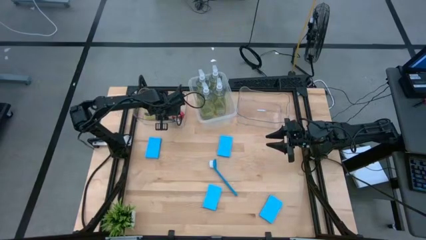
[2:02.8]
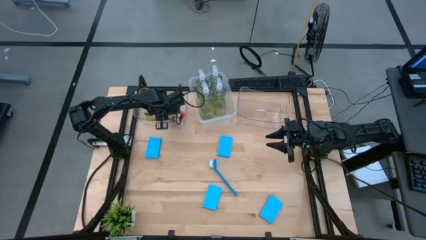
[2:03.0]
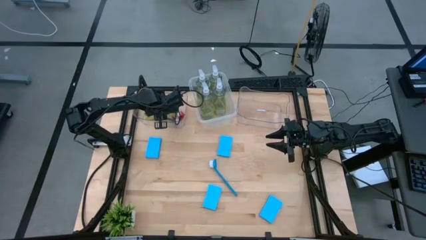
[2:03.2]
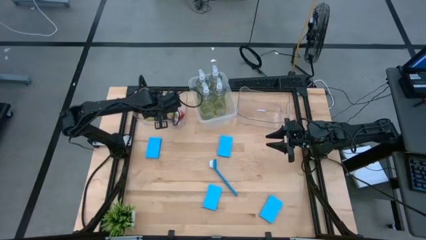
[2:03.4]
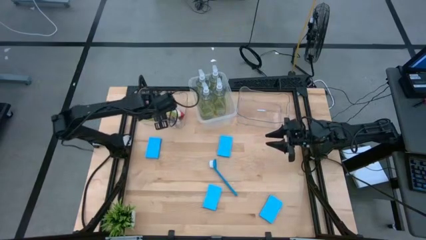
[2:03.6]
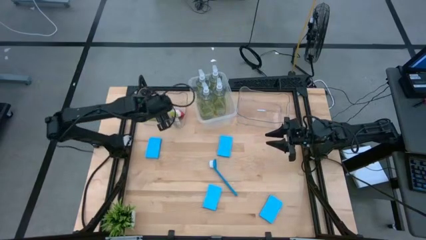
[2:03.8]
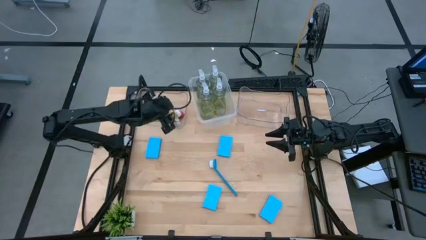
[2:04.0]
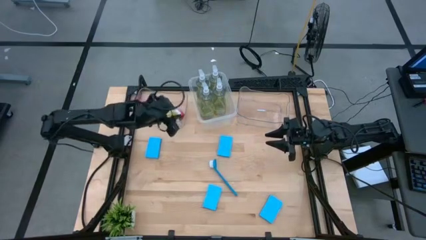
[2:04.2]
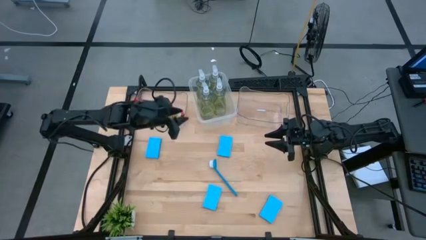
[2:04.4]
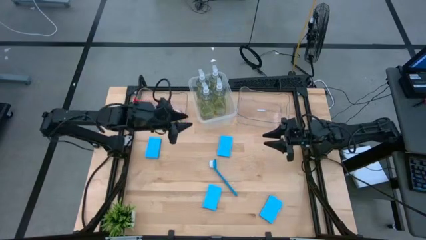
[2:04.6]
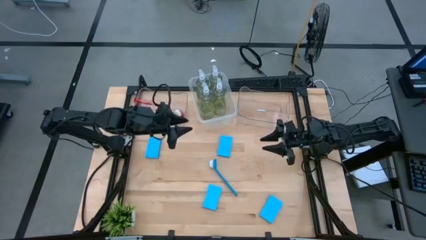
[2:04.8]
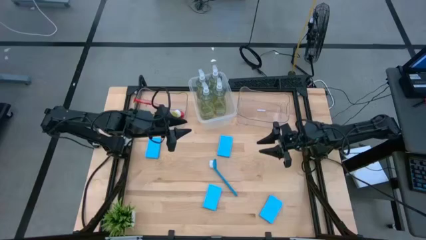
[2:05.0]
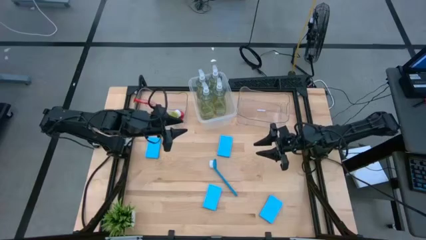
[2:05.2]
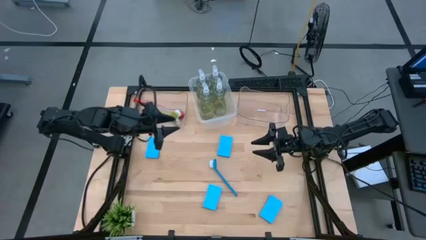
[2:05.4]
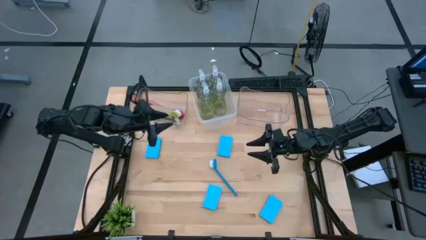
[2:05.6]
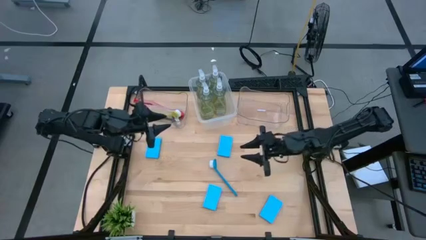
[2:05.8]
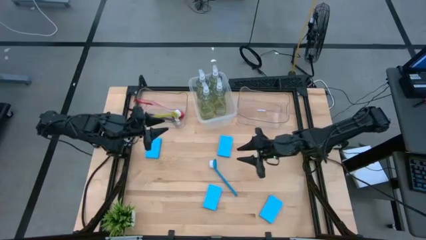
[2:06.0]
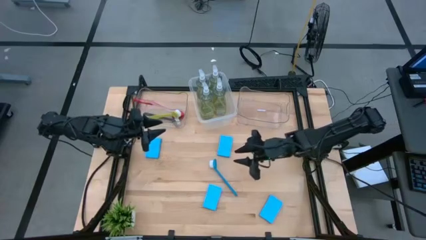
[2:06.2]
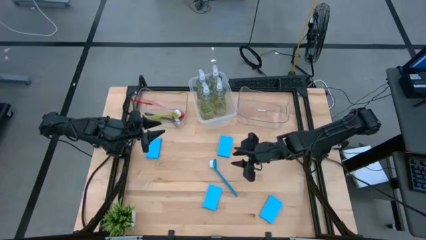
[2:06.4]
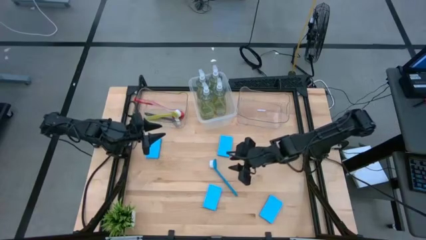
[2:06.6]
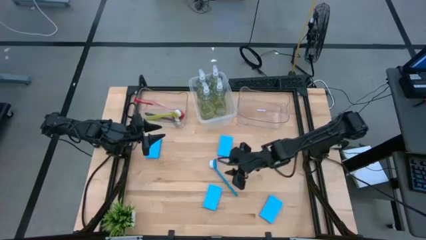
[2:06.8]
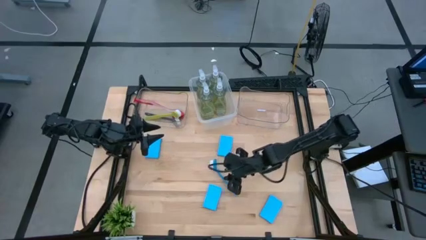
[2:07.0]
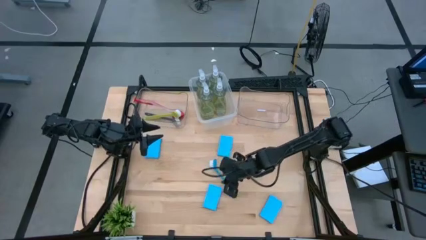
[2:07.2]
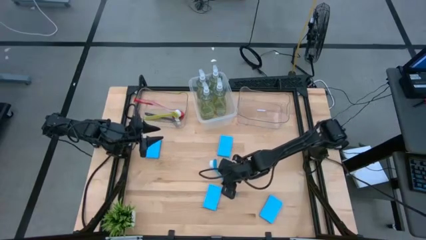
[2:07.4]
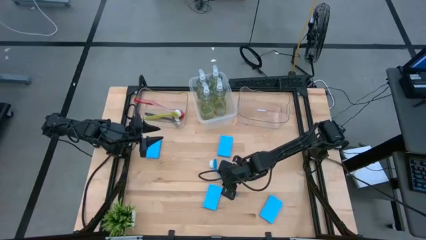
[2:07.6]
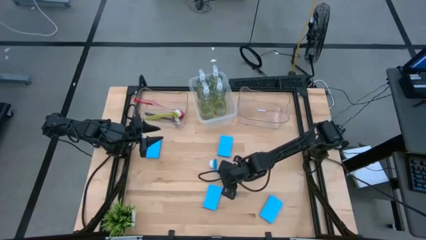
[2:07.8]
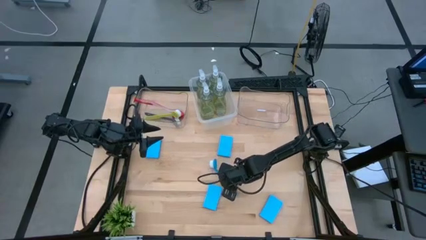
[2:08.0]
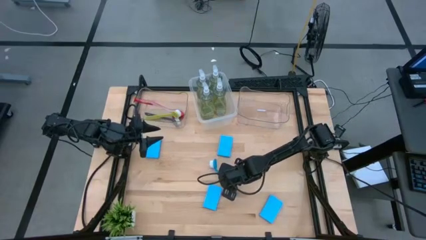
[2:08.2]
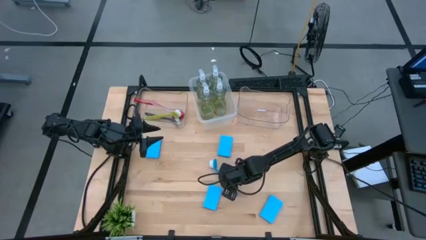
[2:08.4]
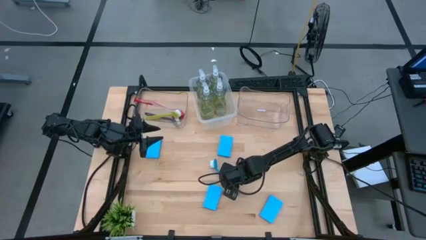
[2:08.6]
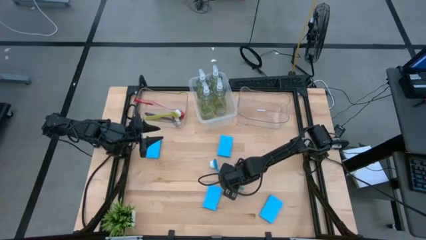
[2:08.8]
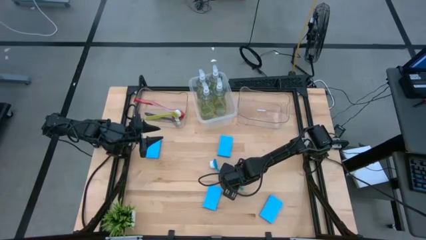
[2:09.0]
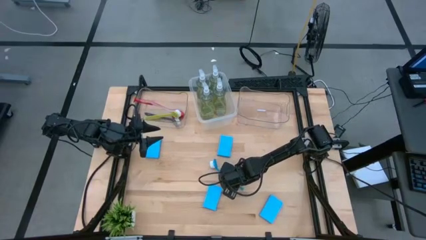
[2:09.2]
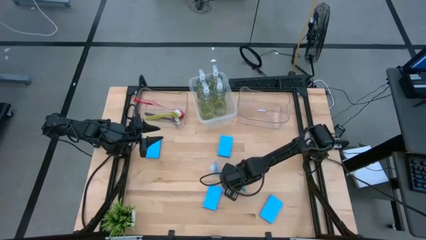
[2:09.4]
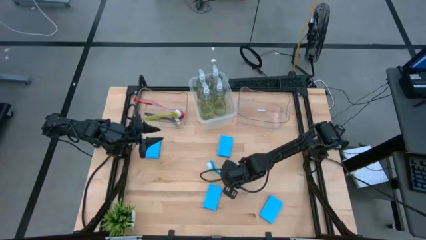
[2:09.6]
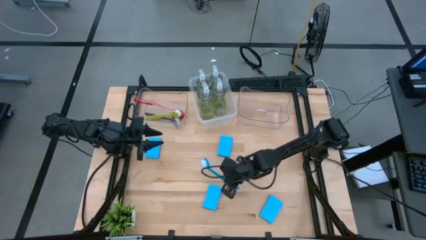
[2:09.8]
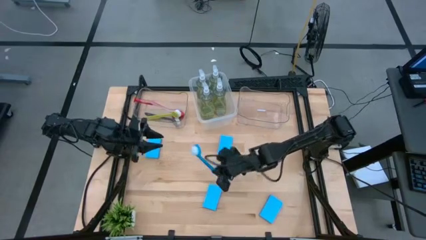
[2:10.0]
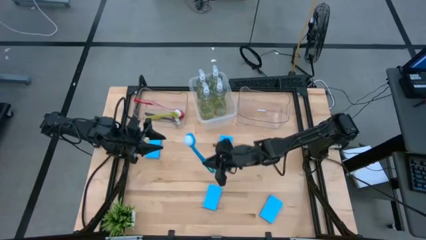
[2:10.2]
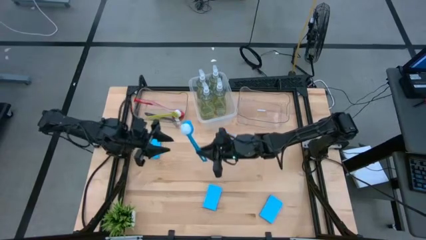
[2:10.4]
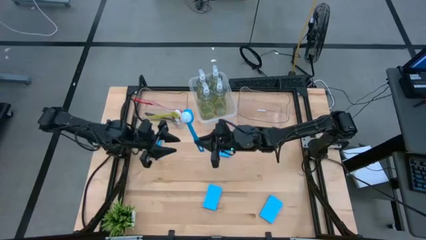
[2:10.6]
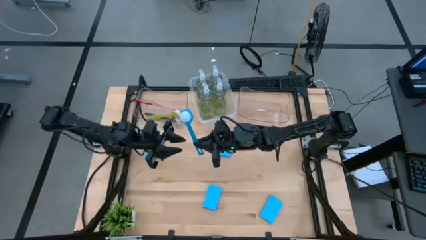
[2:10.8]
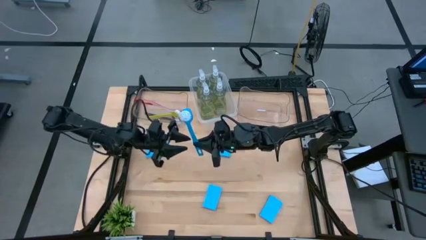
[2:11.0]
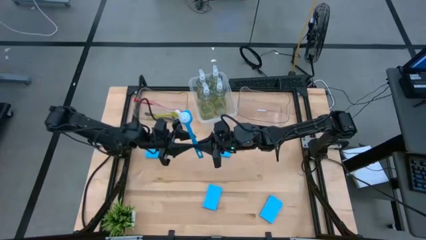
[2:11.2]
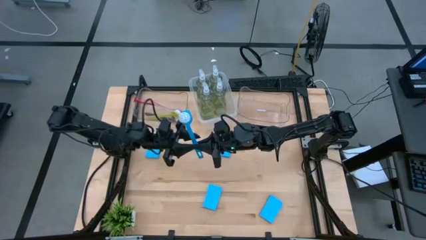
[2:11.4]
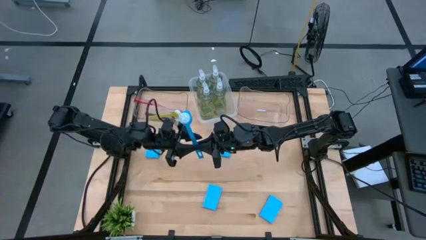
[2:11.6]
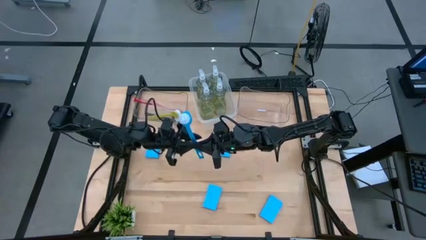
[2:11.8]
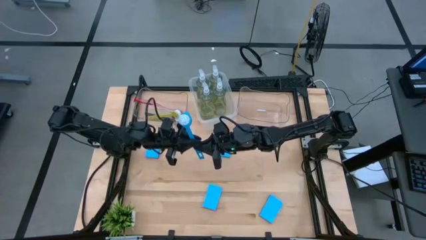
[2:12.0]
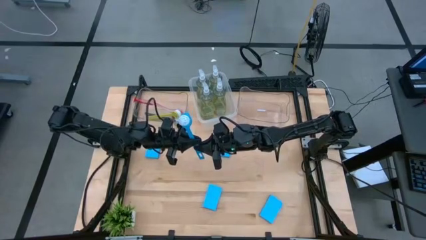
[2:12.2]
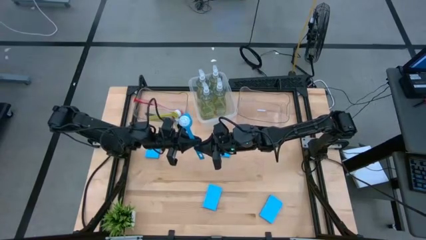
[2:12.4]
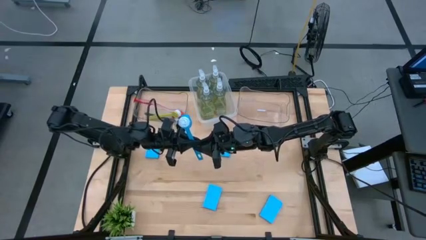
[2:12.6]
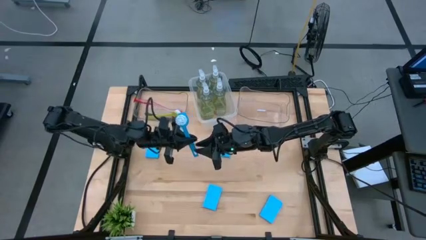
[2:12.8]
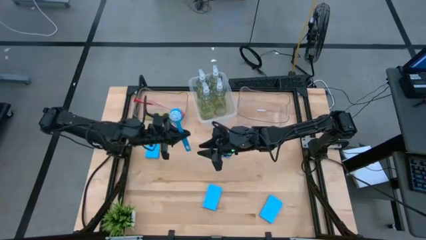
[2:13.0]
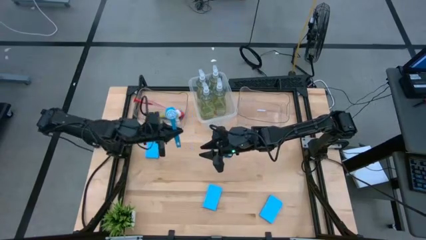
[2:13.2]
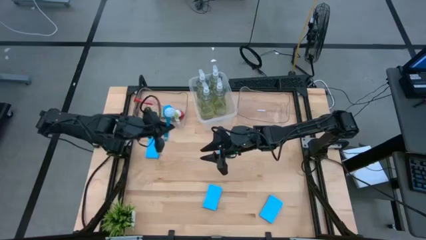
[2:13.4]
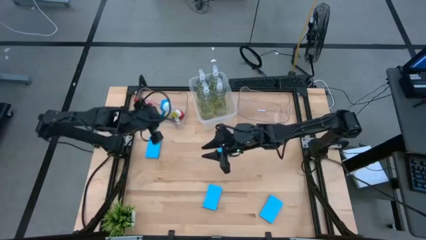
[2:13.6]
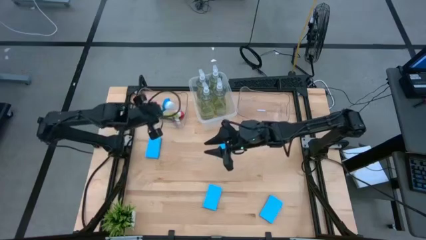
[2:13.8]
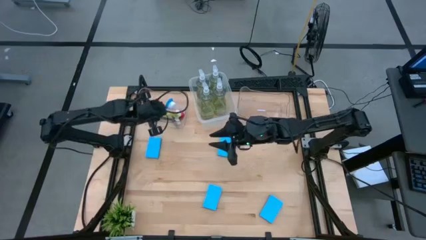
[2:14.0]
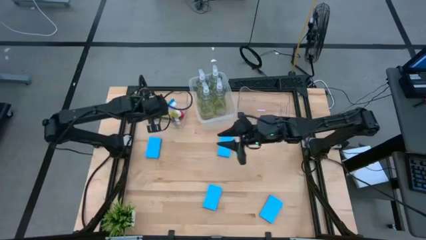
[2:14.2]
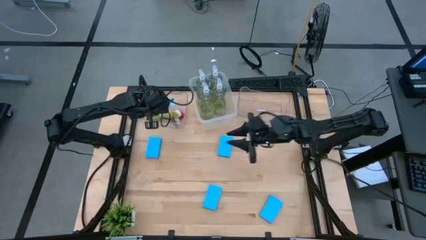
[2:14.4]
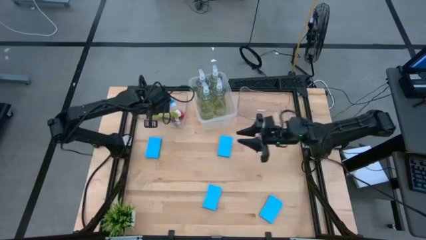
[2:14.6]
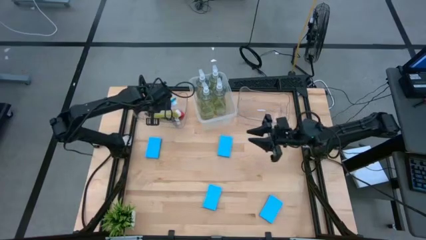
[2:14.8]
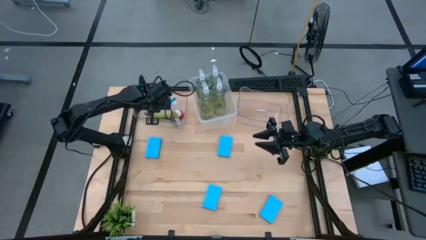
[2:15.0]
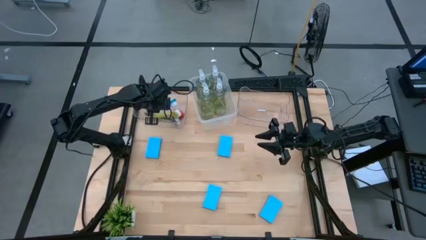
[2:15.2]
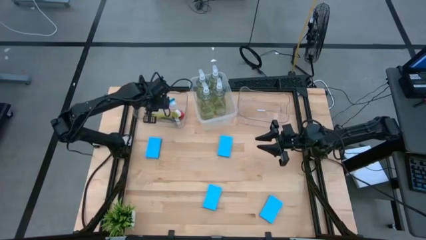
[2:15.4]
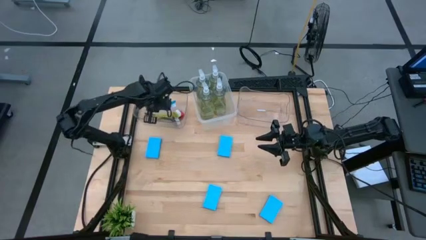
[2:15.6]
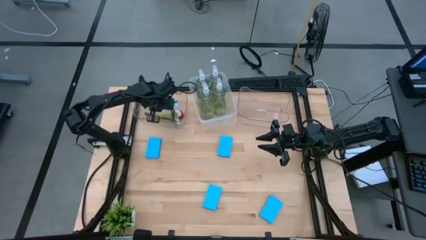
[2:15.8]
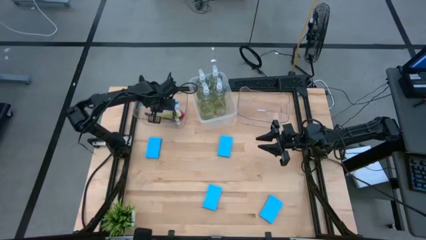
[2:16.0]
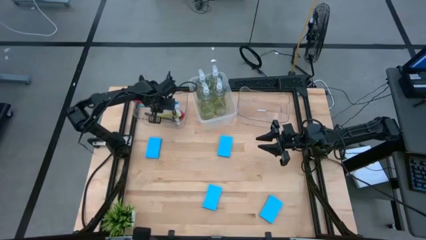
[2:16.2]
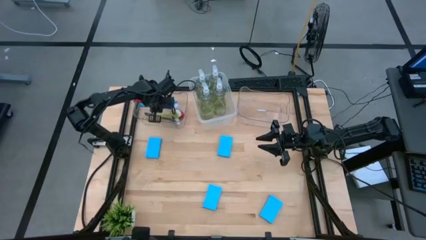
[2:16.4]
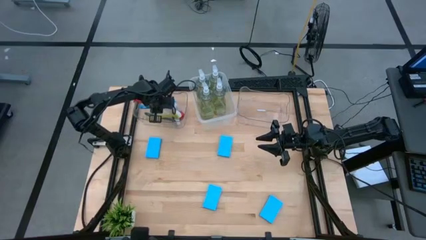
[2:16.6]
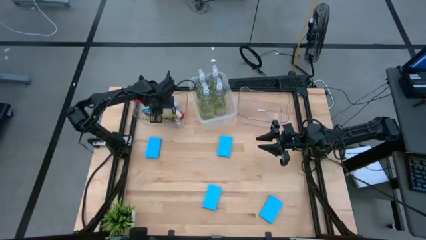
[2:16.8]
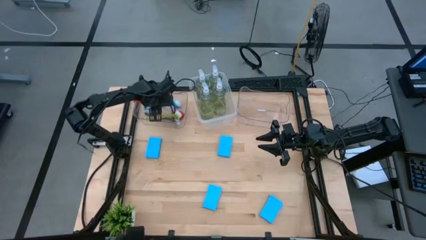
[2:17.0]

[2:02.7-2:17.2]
Task: Pick & Place Kitchen Sink Supplies
Put the blue dish brush into the left transparent bin
